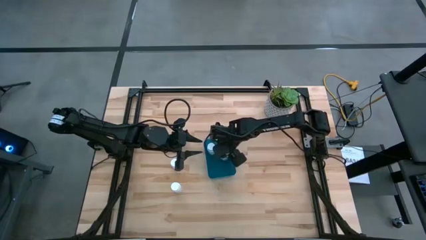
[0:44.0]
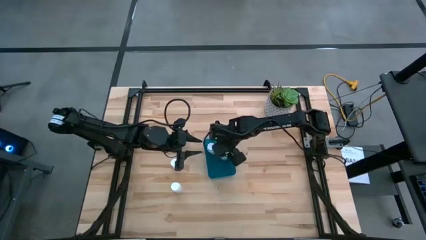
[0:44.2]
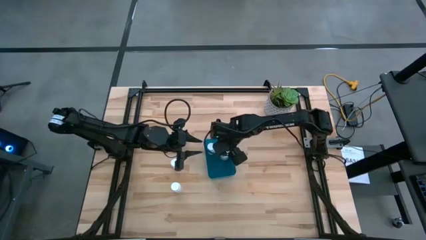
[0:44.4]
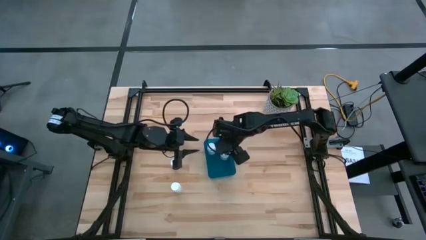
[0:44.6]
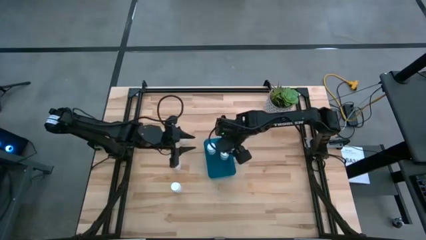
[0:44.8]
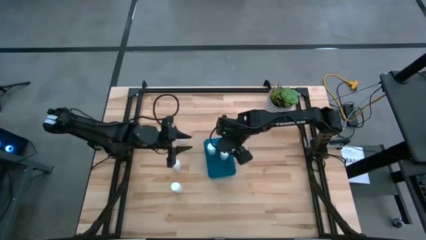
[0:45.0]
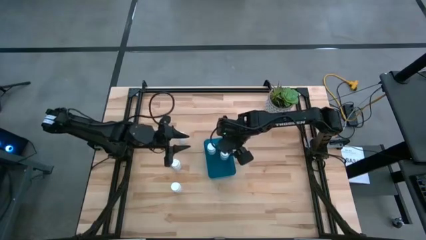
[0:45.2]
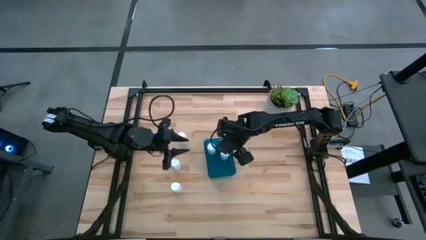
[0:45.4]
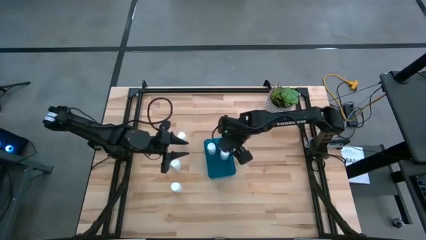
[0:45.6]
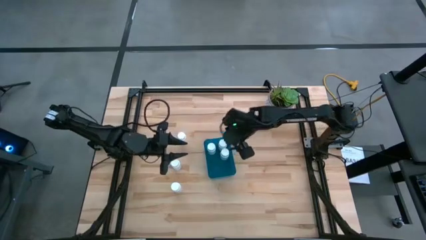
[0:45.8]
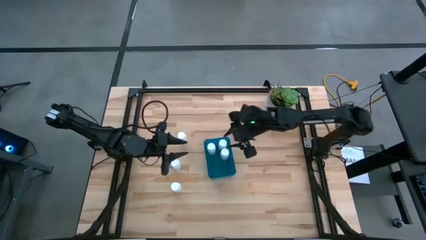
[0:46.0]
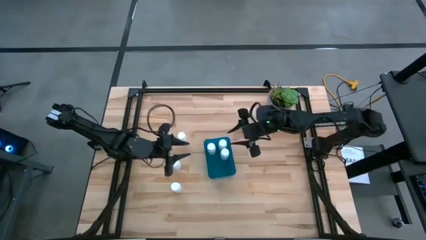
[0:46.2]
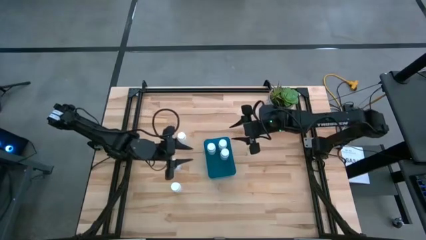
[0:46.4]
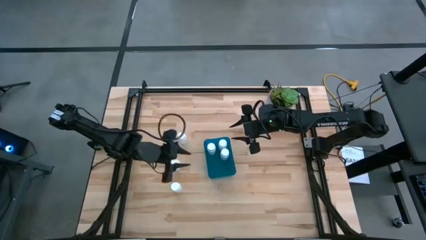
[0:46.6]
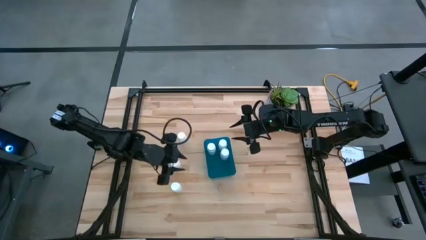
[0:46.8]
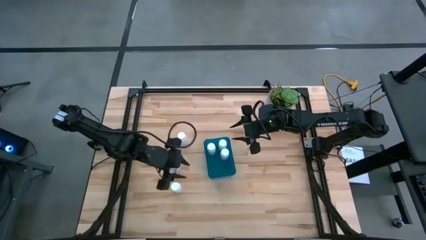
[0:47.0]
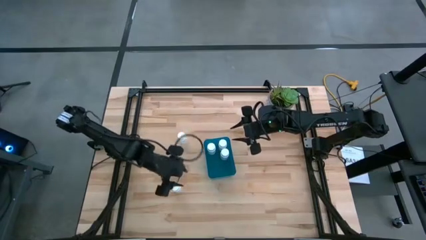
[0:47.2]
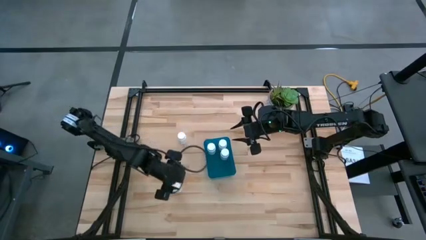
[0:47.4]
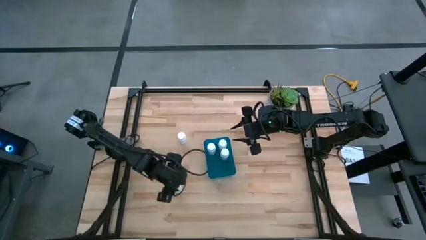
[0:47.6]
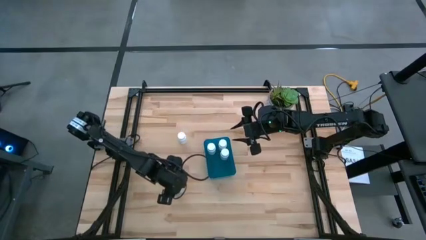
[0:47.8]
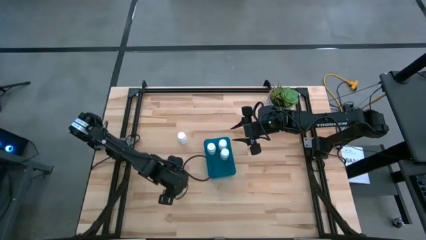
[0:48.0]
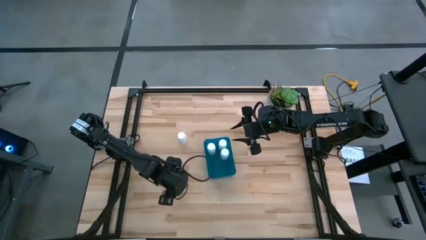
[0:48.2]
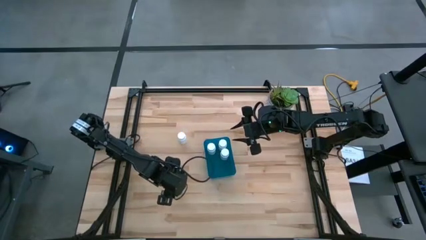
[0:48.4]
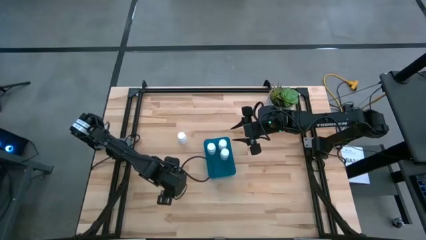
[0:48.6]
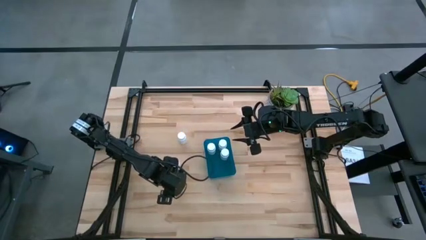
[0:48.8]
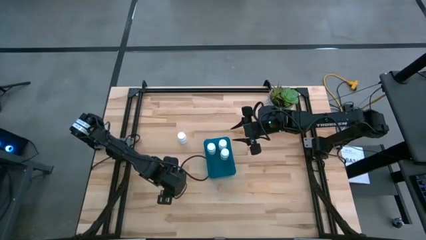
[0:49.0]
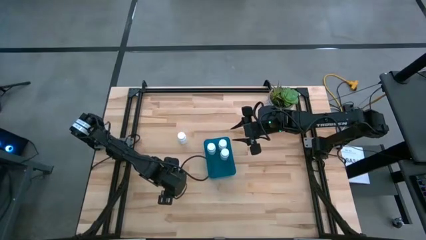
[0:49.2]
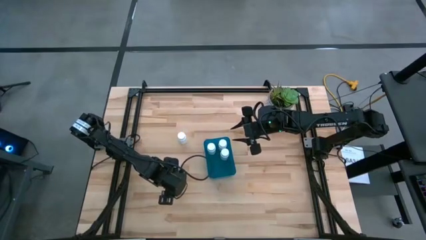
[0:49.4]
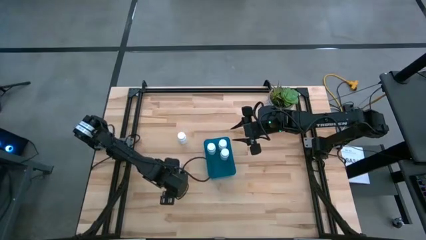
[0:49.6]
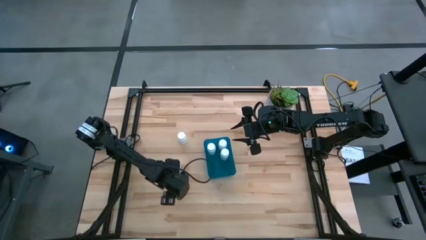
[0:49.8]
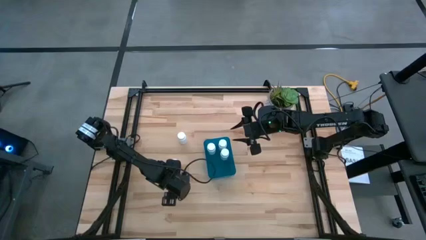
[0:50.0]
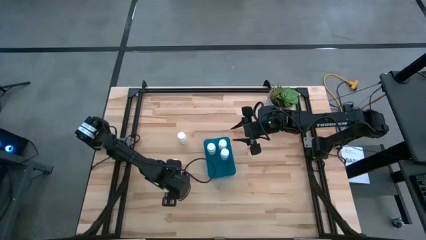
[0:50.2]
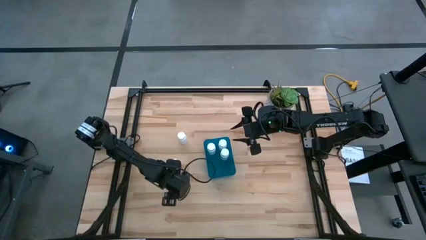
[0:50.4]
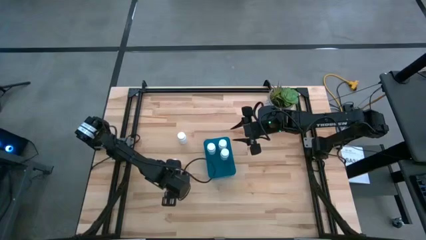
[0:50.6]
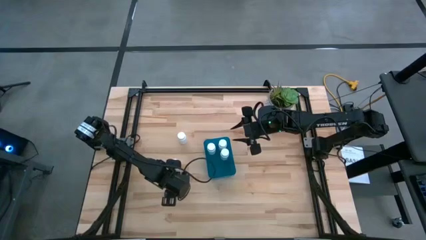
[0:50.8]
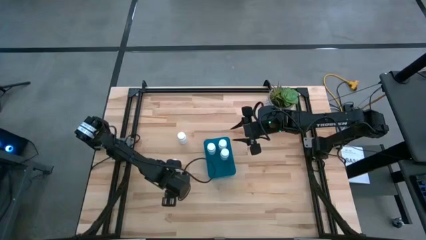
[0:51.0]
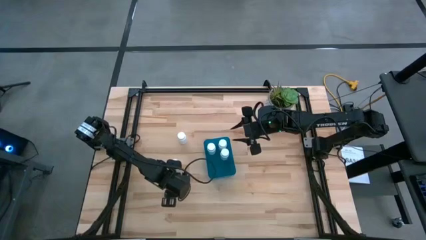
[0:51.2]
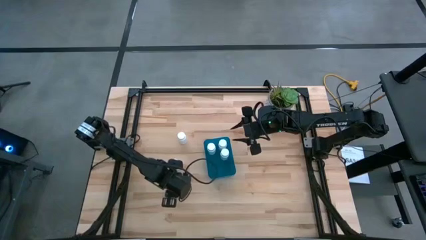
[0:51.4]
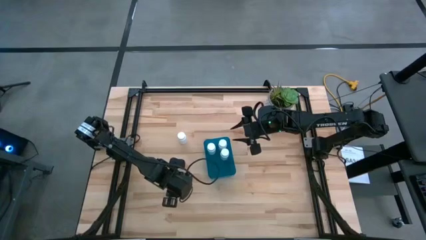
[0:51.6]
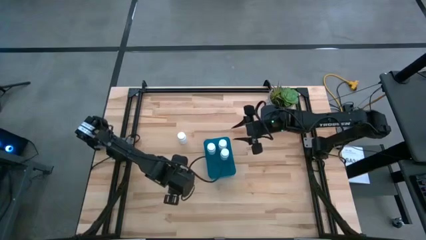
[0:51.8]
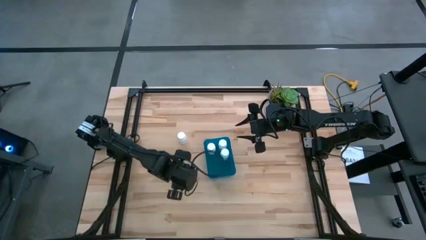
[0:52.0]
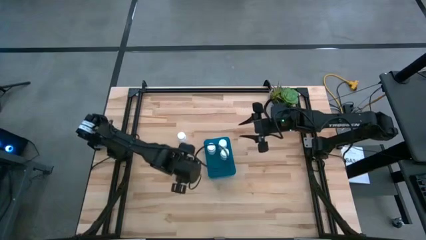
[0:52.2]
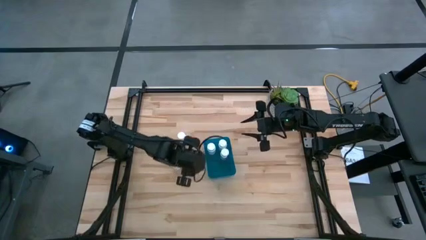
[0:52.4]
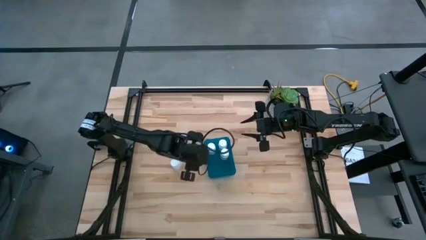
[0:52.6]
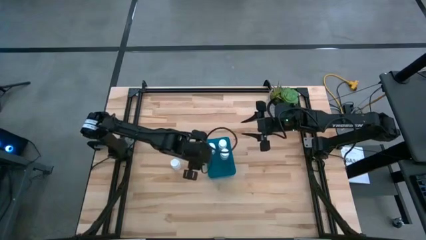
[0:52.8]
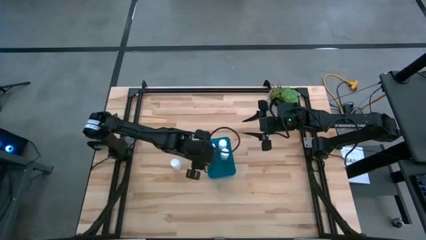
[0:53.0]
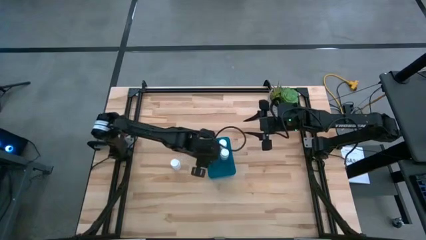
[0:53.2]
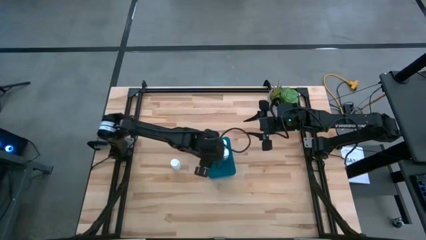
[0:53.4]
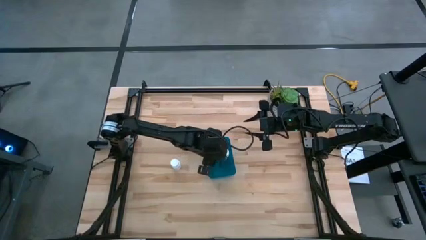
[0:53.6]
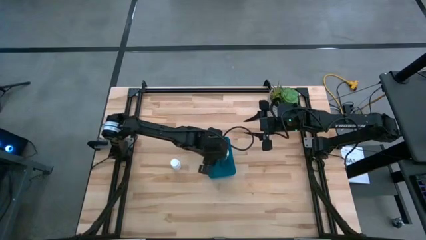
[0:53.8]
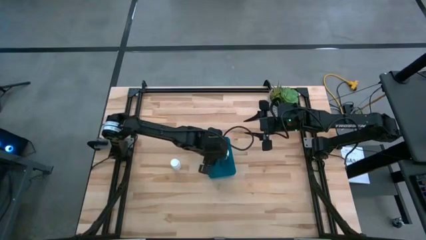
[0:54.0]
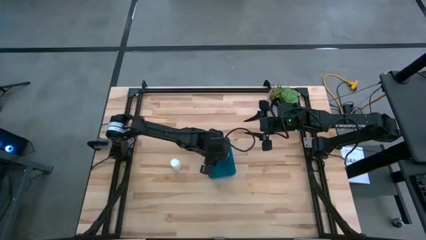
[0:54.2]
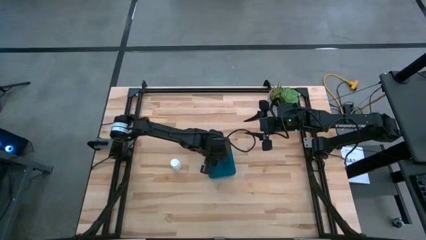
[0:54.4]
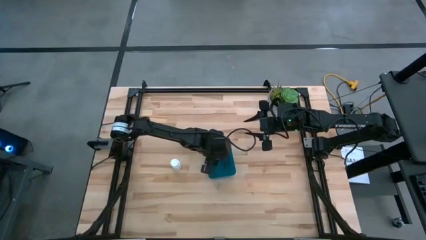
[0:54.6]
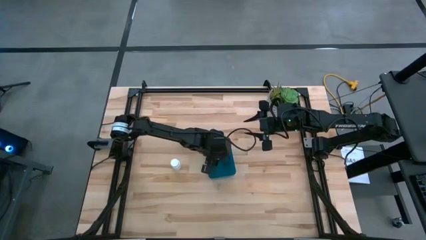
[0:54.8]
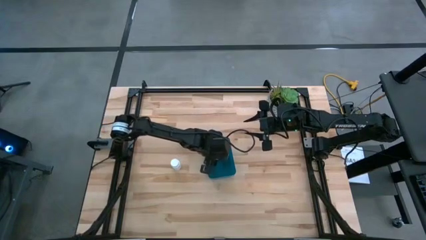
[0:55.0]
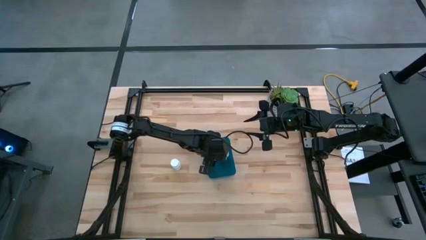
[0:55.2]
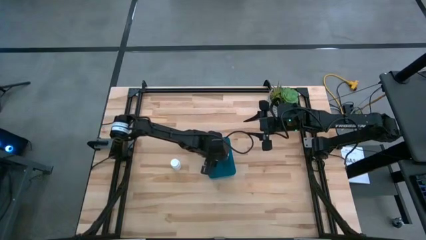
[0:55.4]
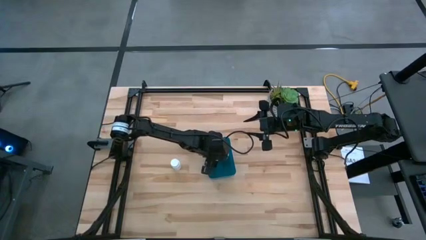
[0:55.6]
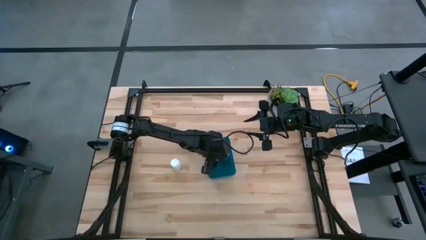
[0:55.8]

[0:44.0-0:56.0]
Task: Pick and place pill bottles into a basket
Put the white pill bottle into the blue bin
